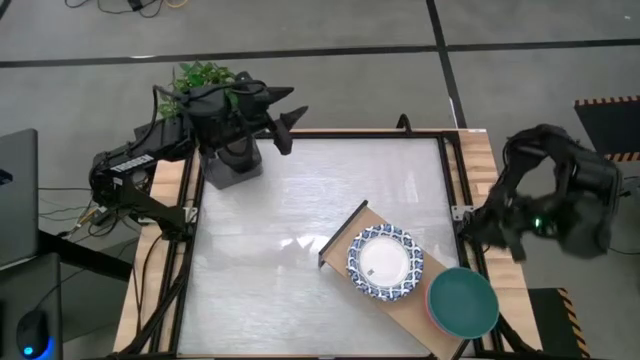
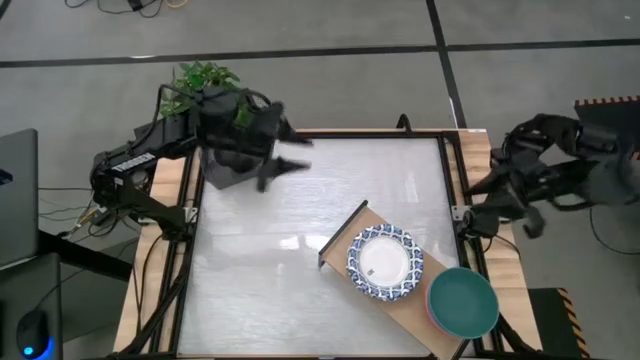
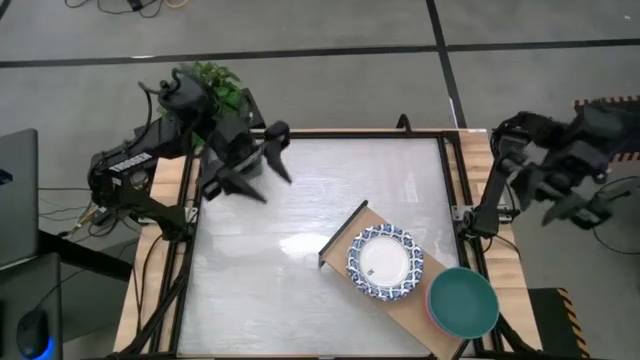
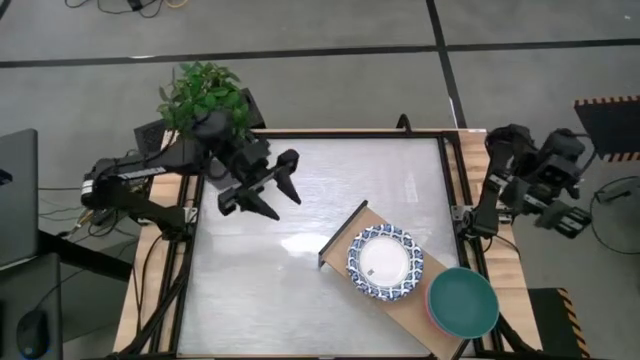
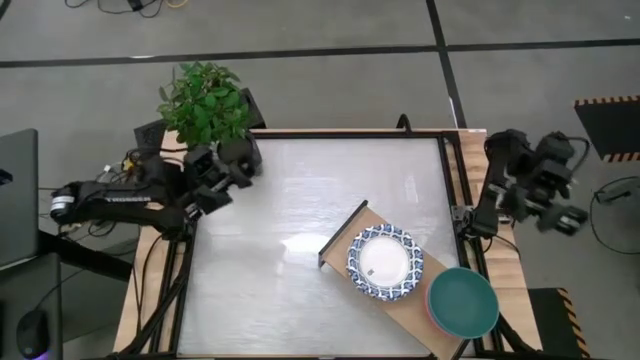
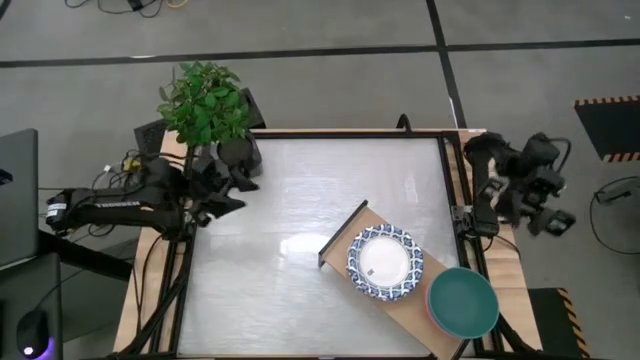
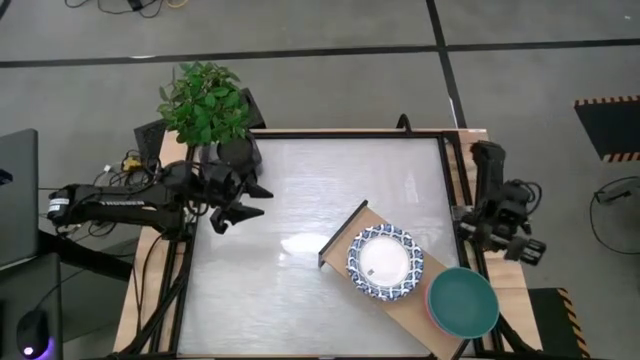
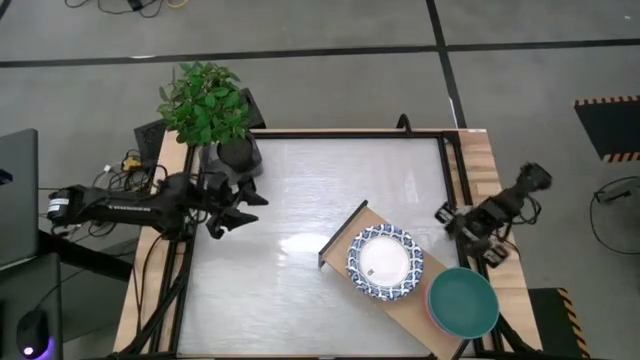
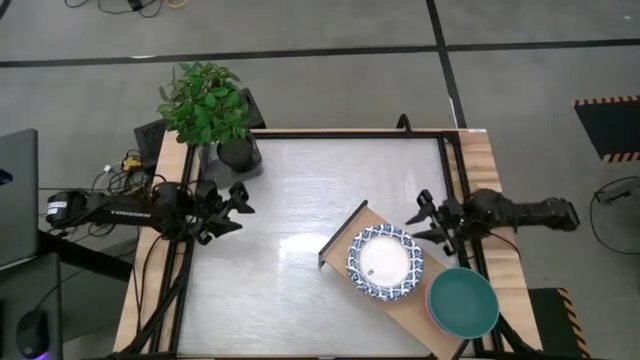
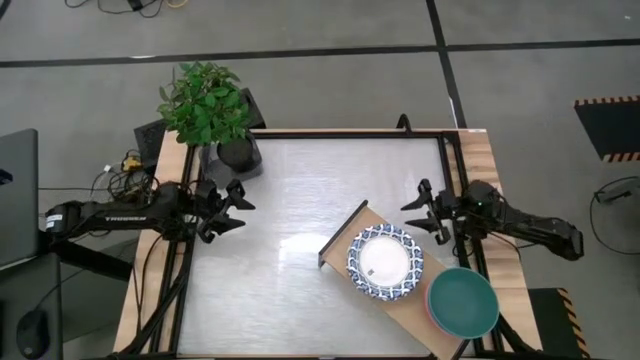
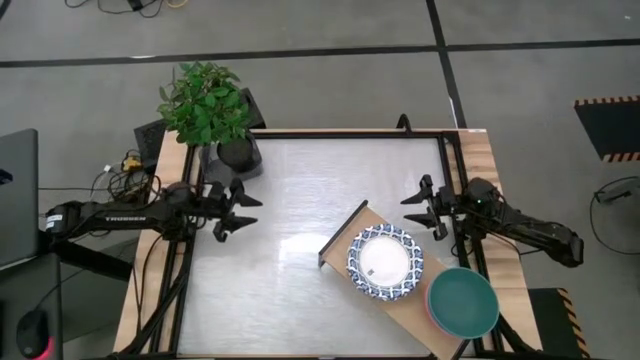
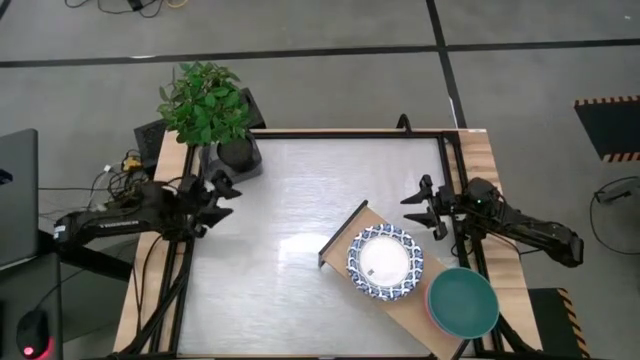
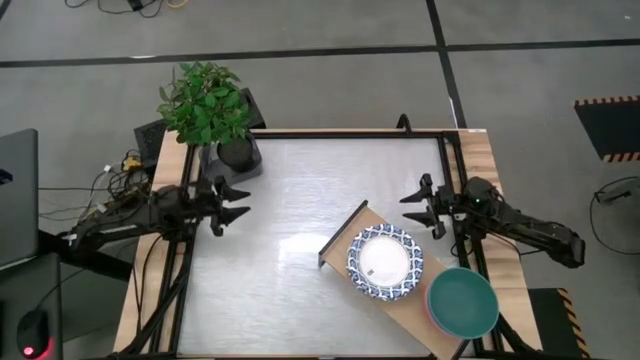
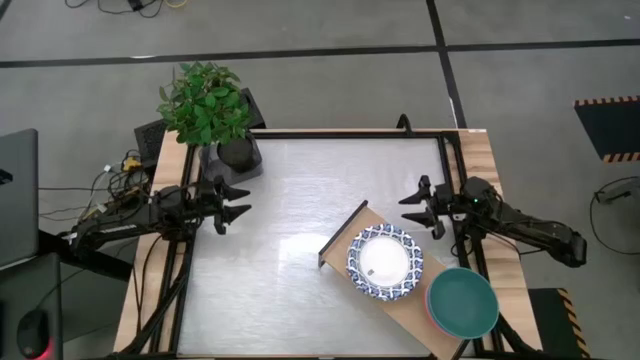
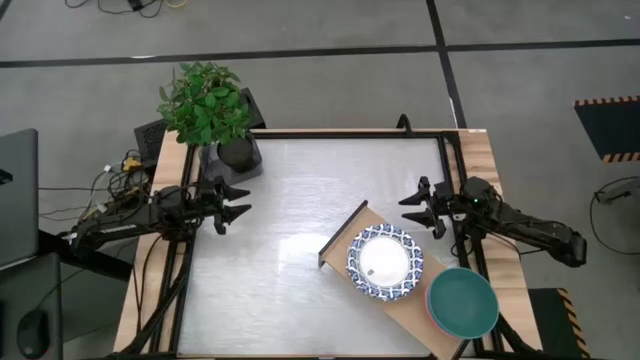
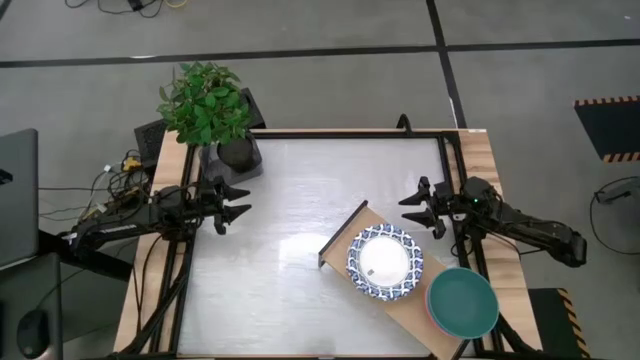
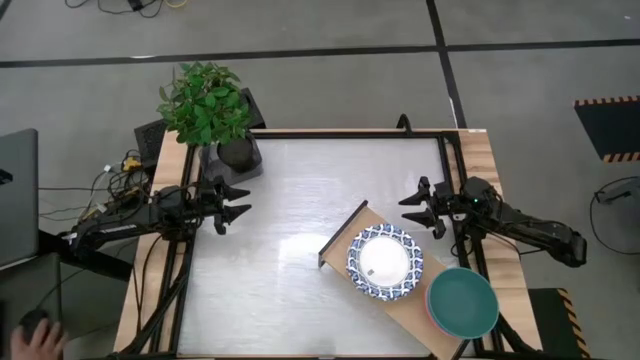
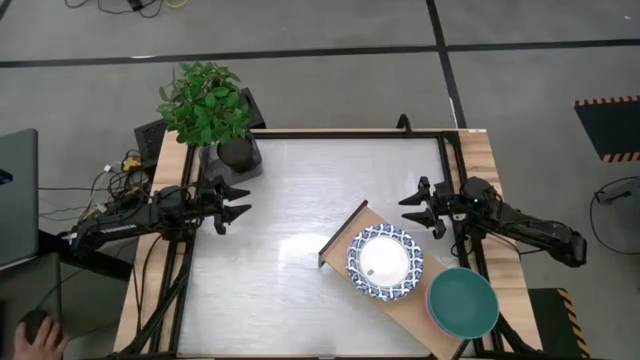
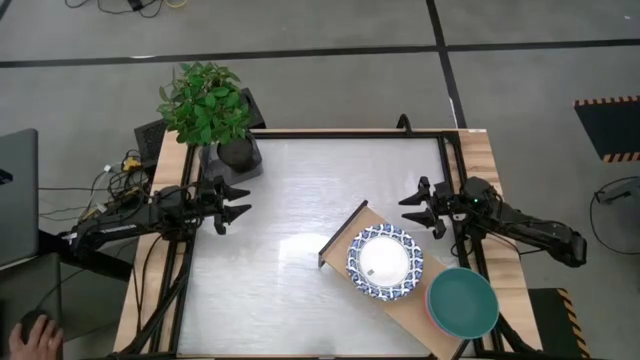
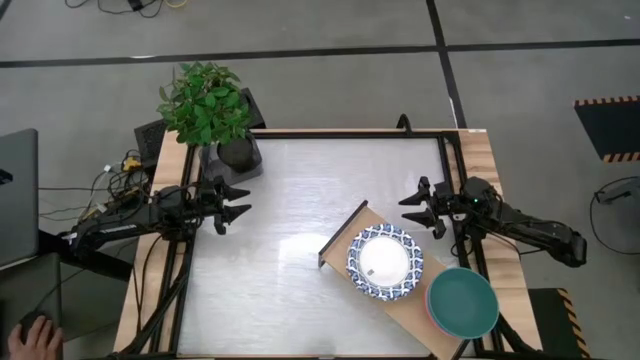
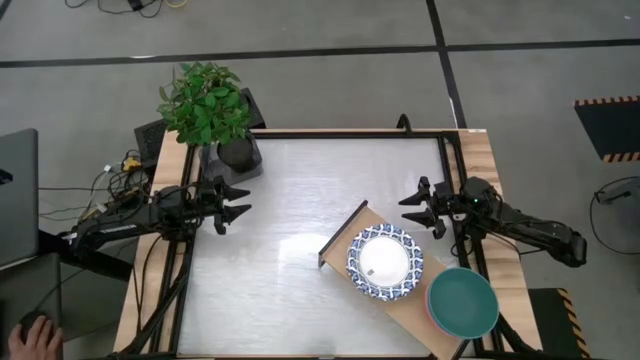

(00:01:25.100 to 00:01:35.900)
Task: Place and stack bowls onto a shelf
Return to Home Position

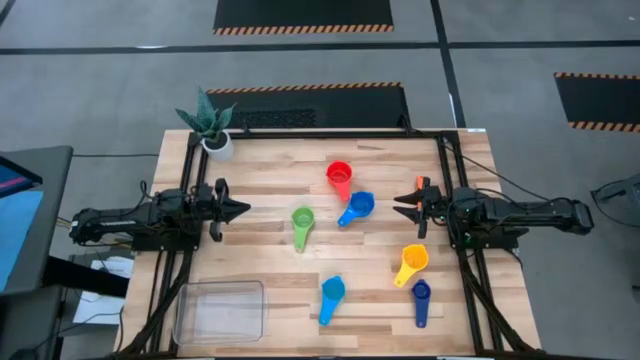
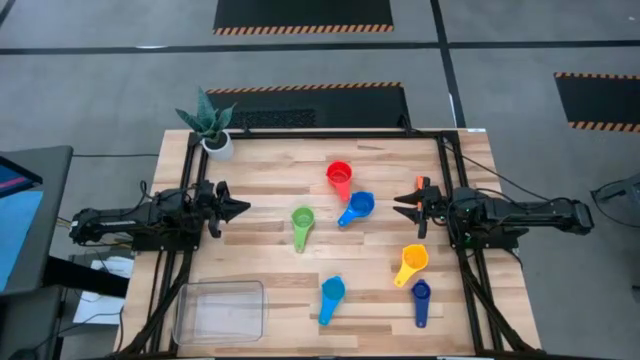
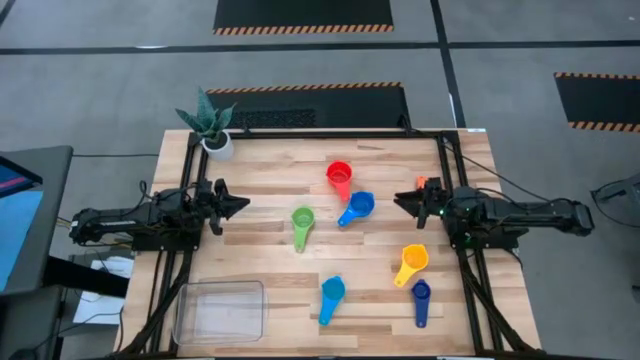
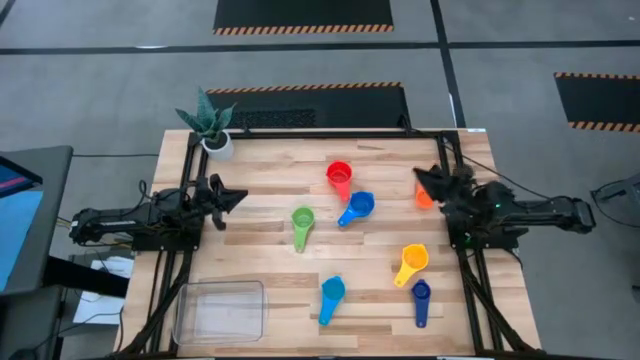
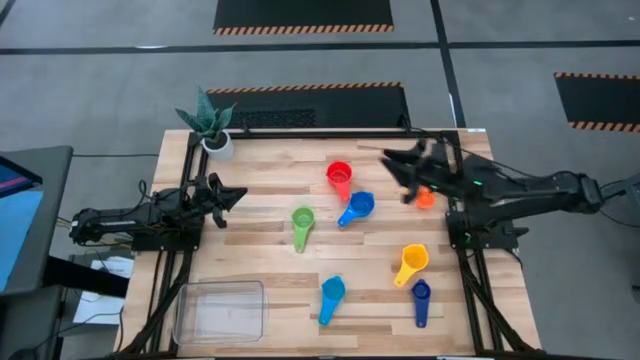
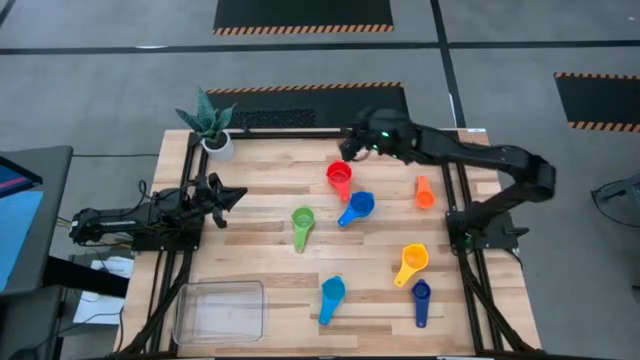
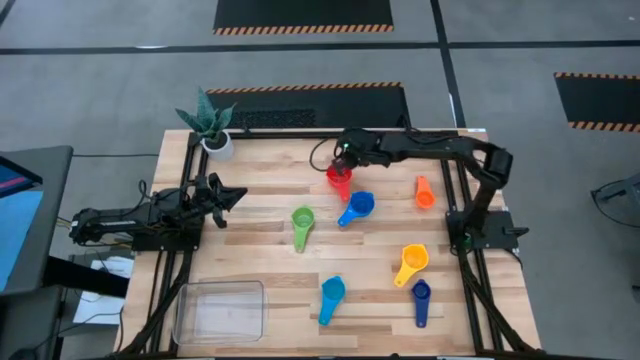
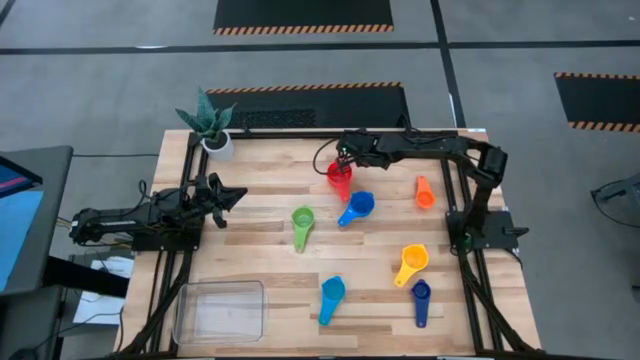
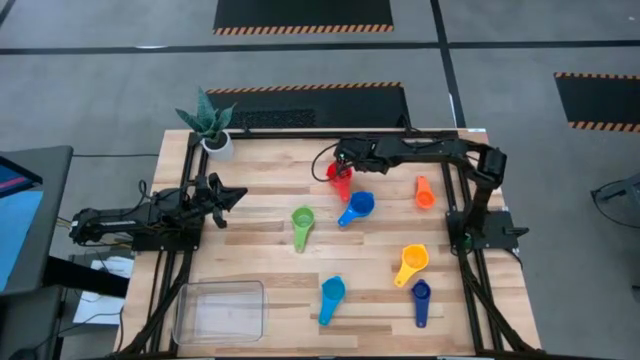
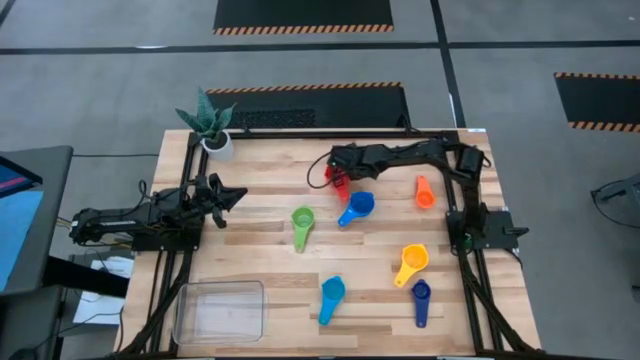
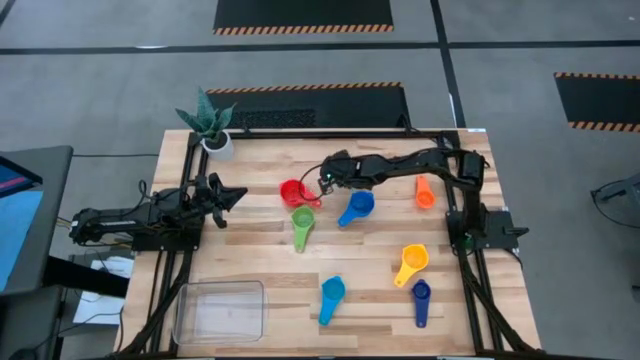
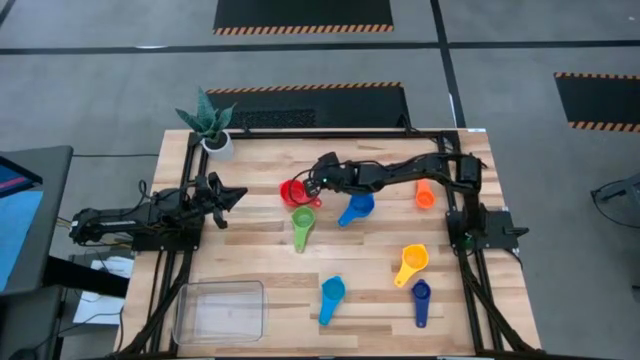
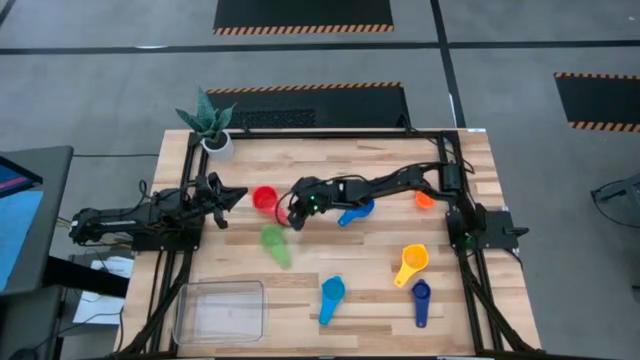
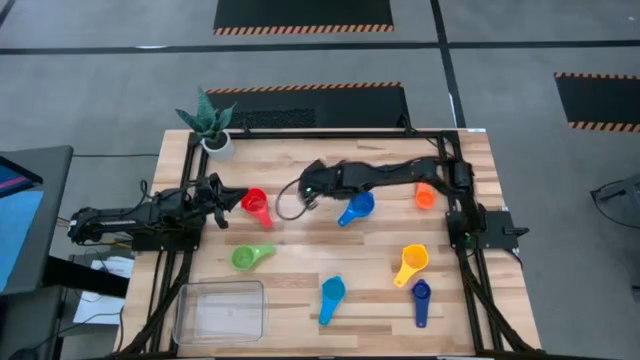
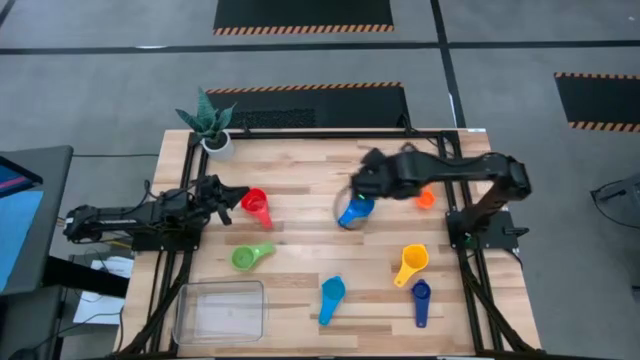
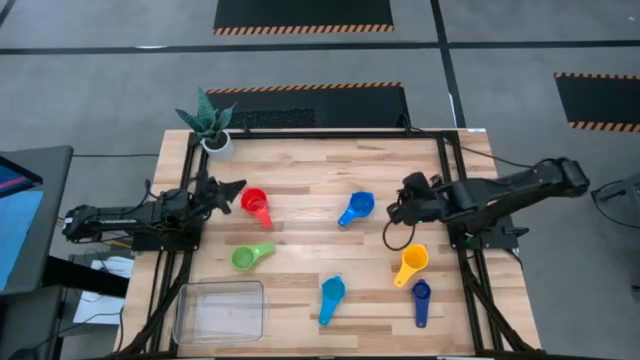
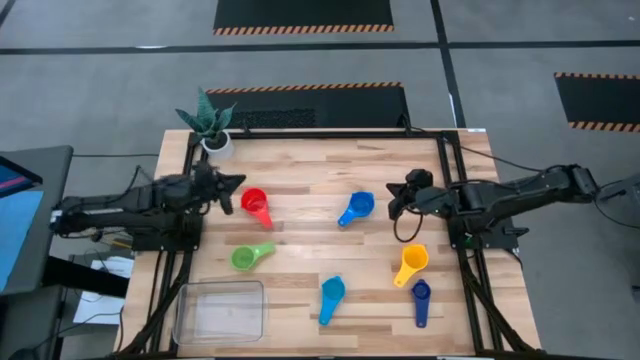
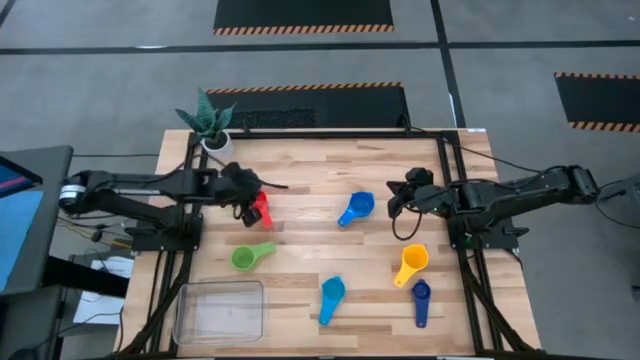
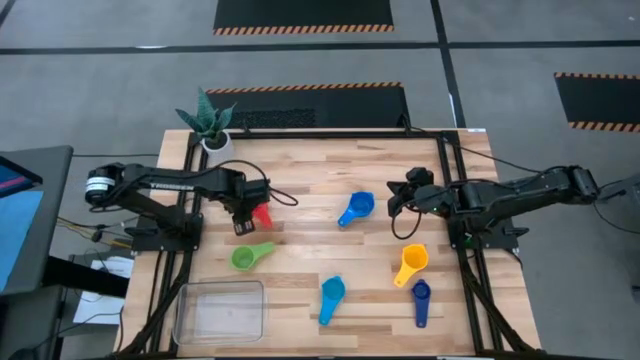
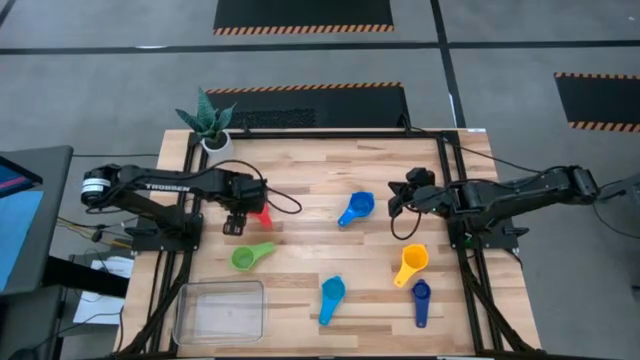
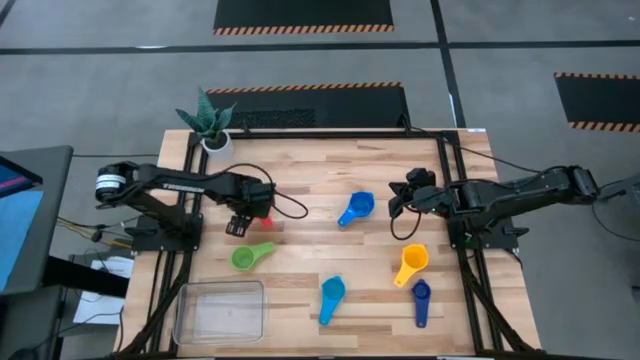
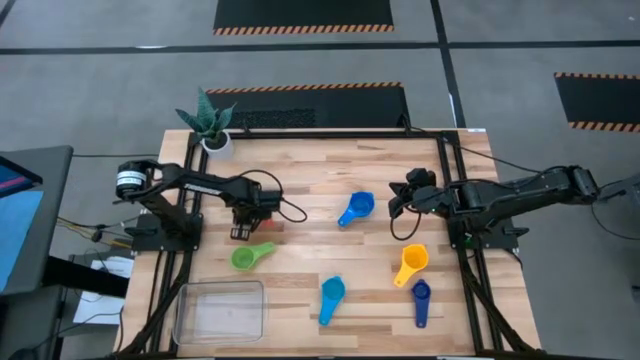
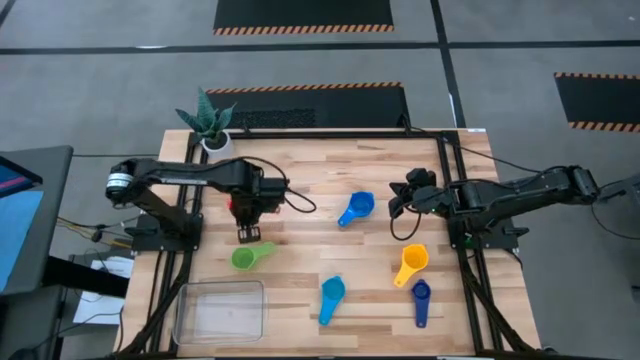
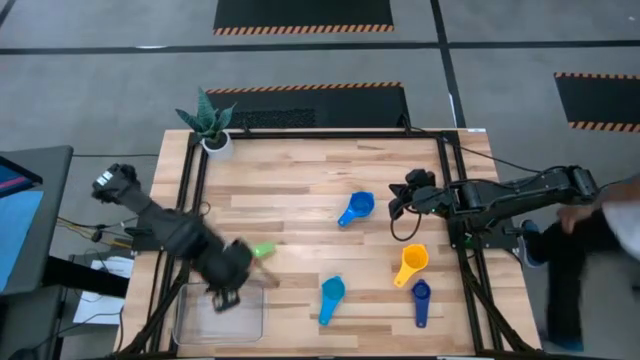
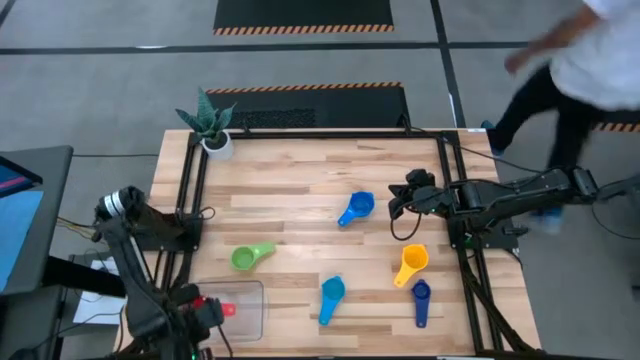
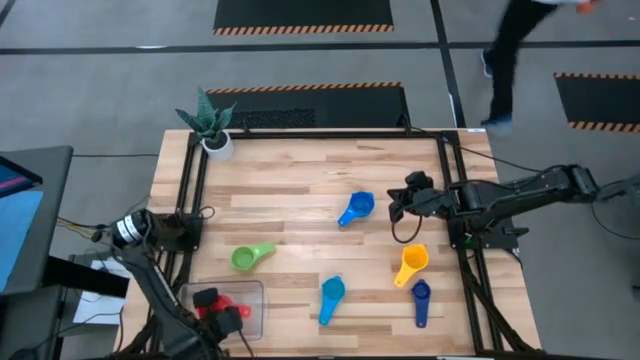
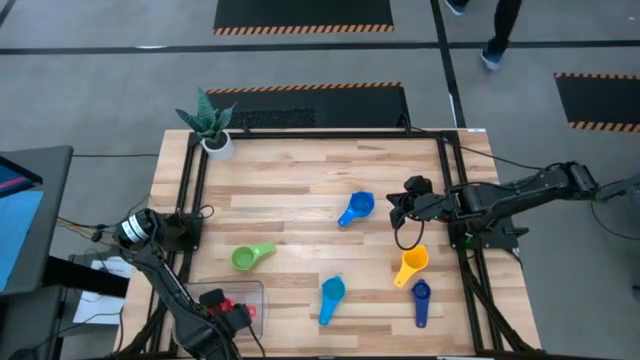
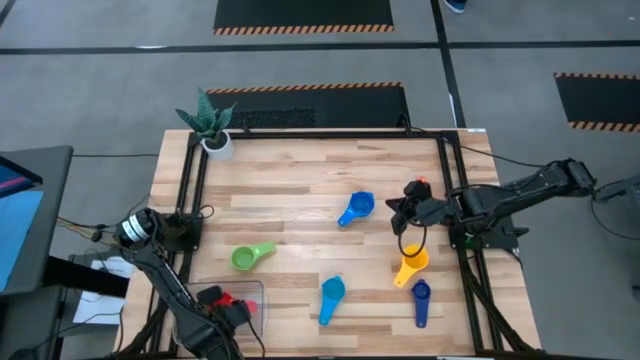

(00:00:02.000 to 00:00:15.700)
Task: Nest measuring cups in basket
Put the red measuring cup in the transparent bin
